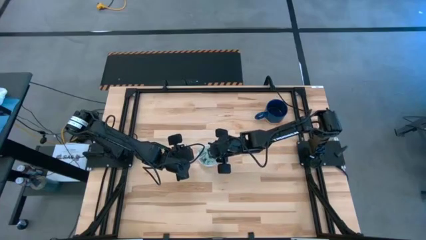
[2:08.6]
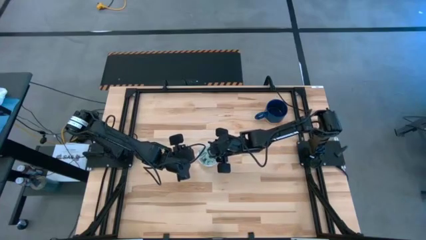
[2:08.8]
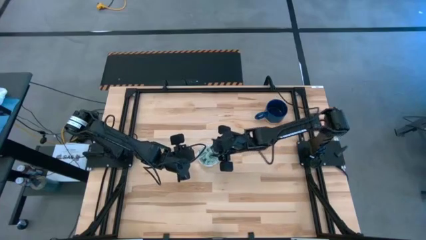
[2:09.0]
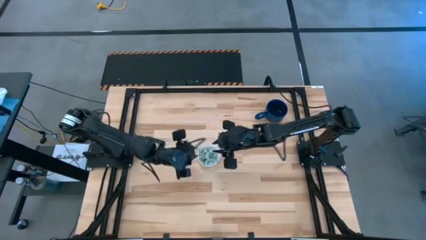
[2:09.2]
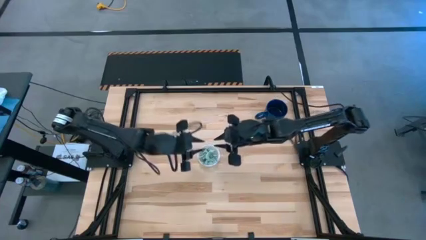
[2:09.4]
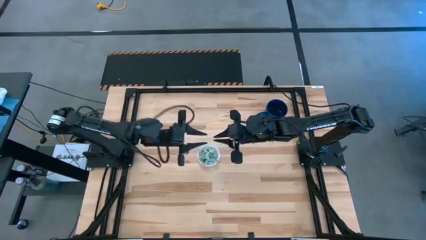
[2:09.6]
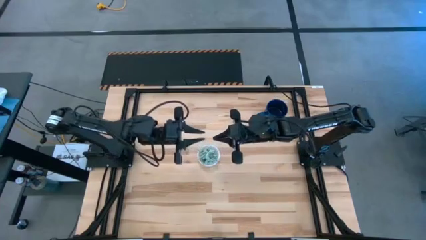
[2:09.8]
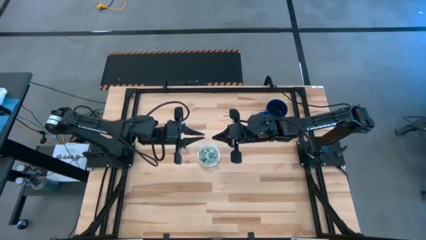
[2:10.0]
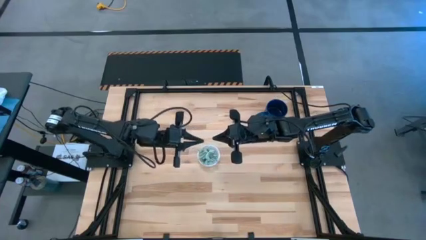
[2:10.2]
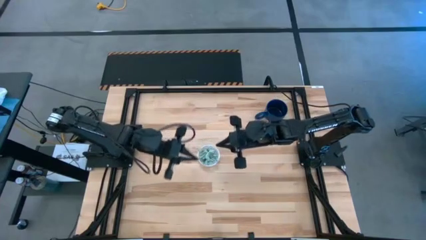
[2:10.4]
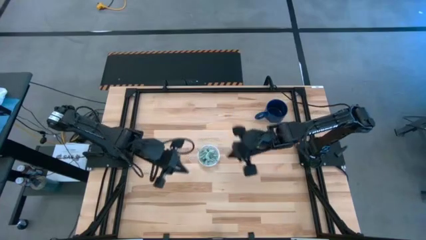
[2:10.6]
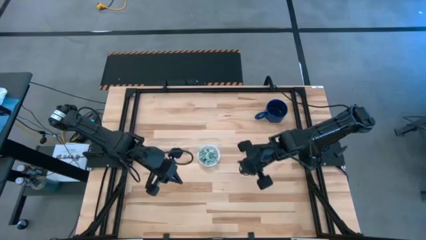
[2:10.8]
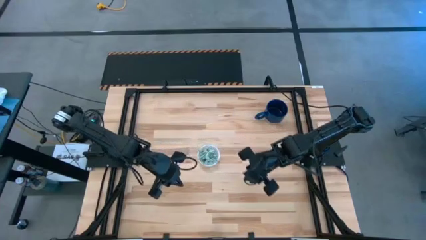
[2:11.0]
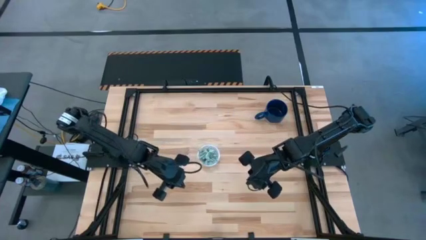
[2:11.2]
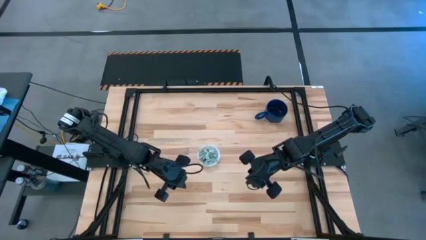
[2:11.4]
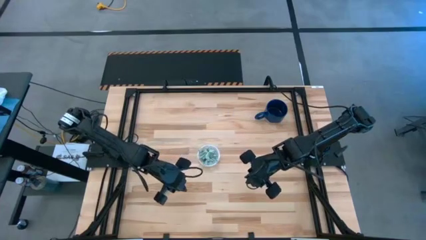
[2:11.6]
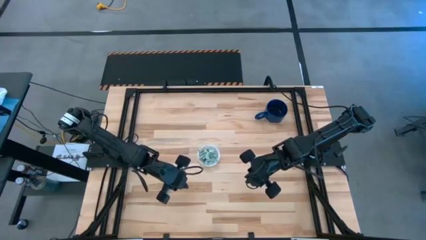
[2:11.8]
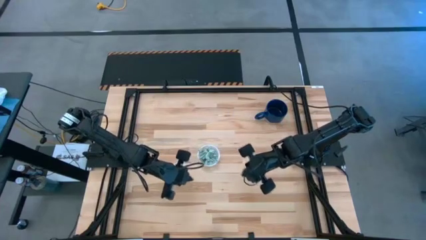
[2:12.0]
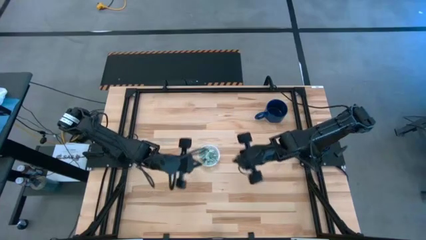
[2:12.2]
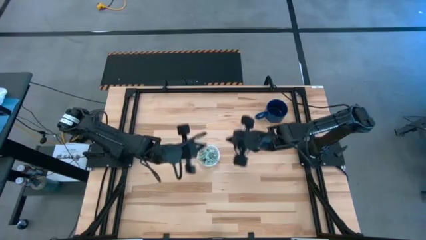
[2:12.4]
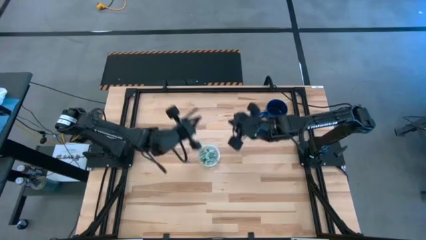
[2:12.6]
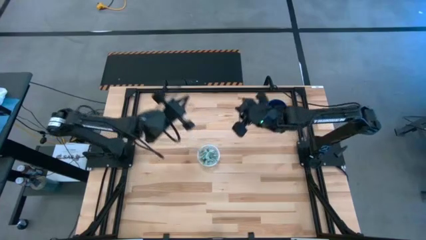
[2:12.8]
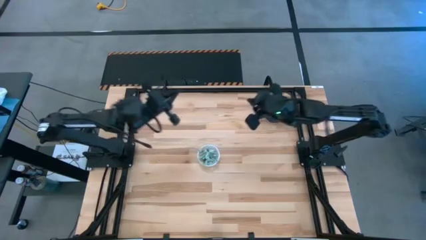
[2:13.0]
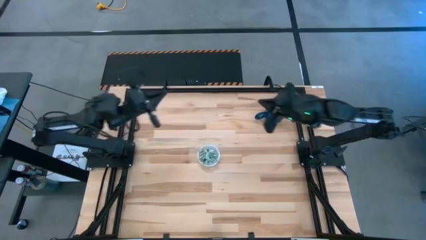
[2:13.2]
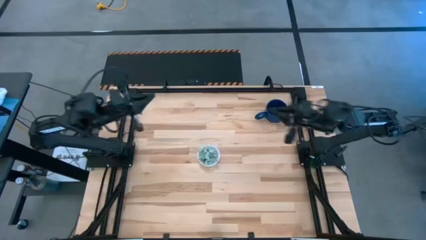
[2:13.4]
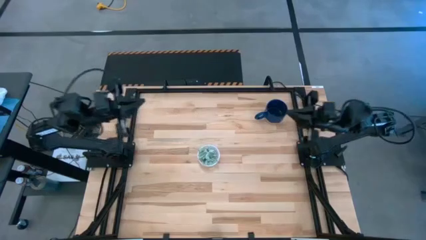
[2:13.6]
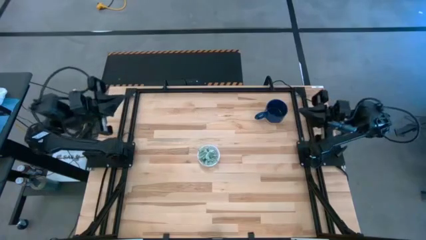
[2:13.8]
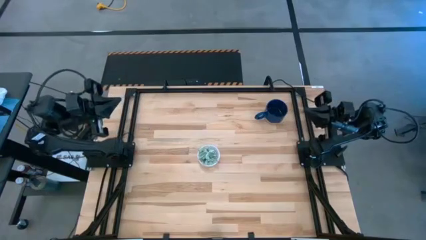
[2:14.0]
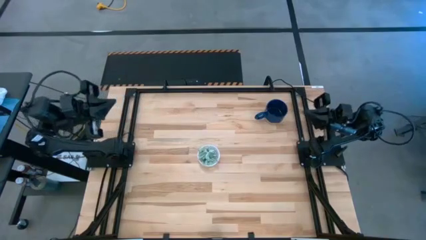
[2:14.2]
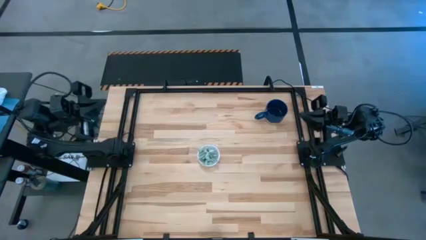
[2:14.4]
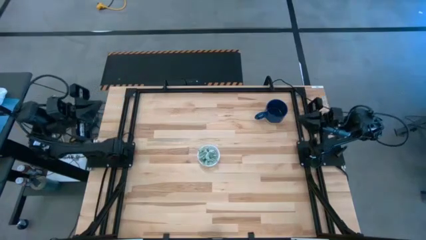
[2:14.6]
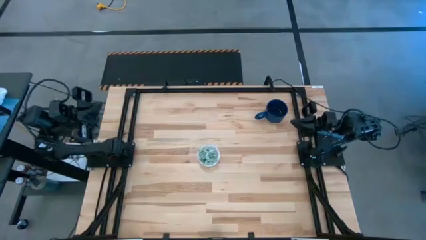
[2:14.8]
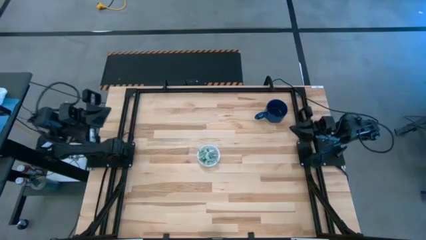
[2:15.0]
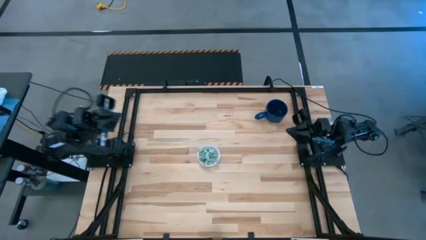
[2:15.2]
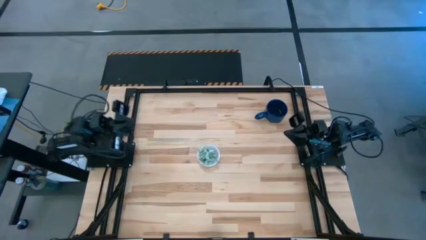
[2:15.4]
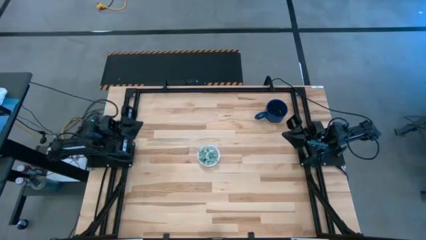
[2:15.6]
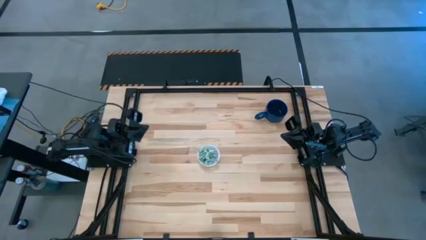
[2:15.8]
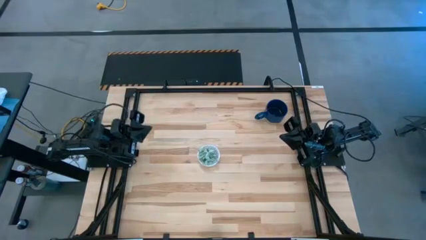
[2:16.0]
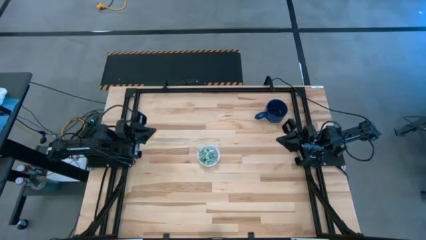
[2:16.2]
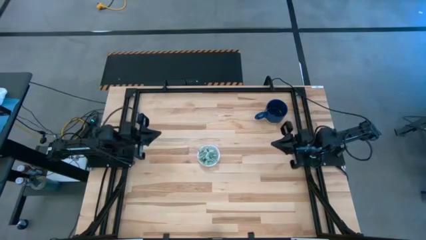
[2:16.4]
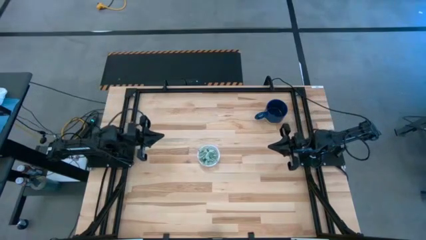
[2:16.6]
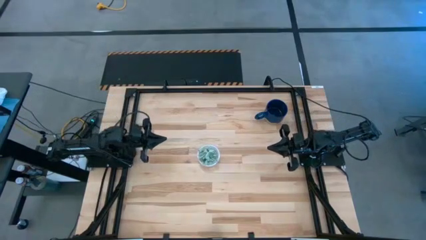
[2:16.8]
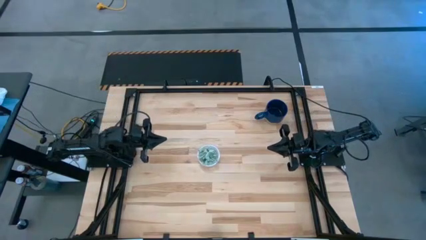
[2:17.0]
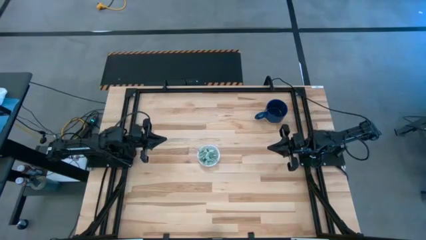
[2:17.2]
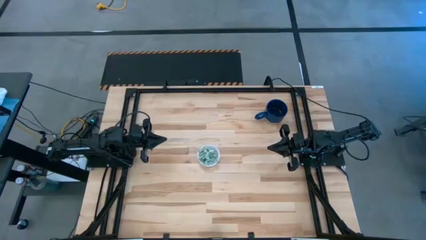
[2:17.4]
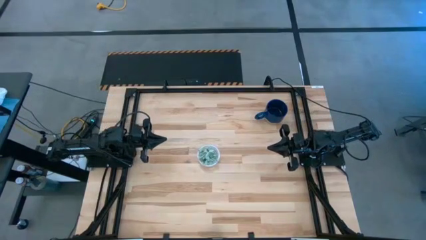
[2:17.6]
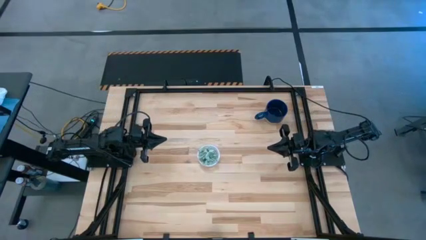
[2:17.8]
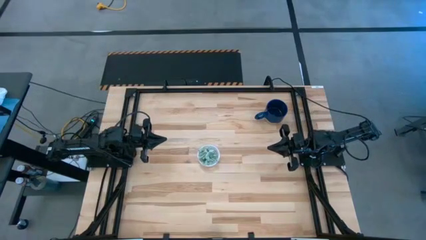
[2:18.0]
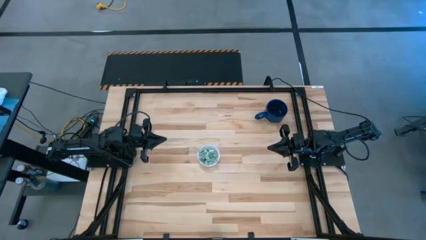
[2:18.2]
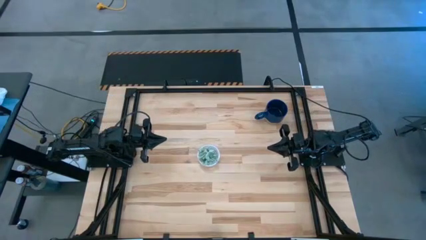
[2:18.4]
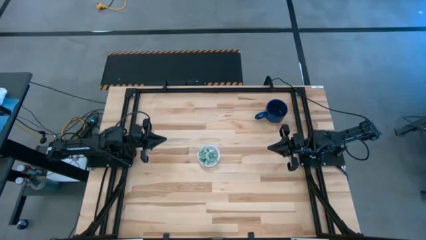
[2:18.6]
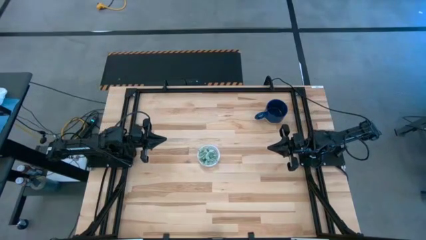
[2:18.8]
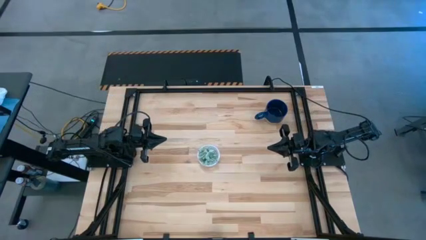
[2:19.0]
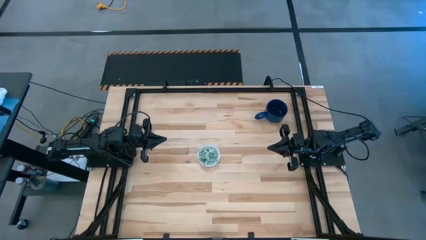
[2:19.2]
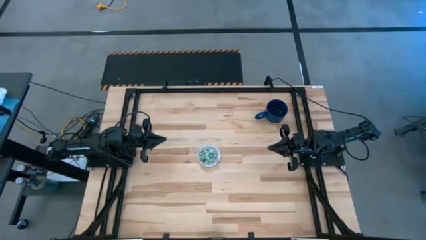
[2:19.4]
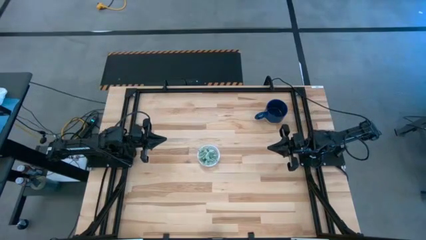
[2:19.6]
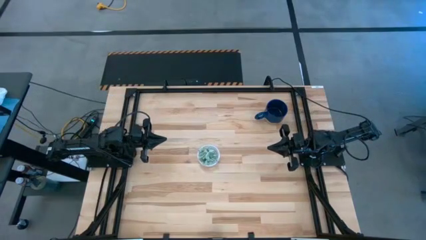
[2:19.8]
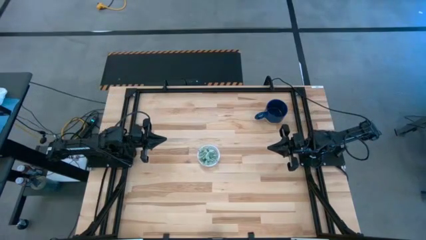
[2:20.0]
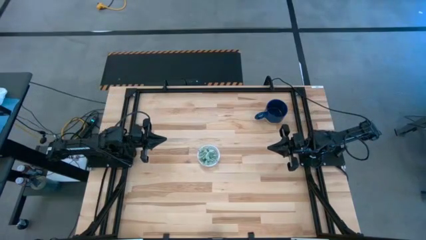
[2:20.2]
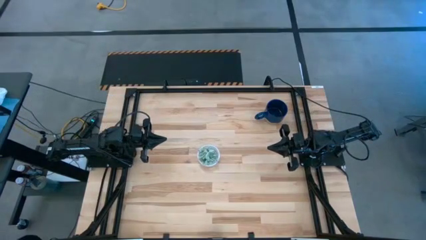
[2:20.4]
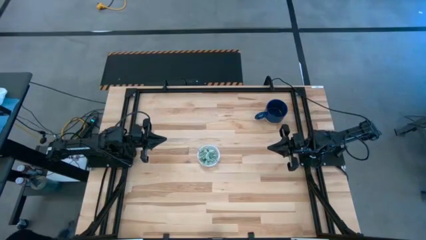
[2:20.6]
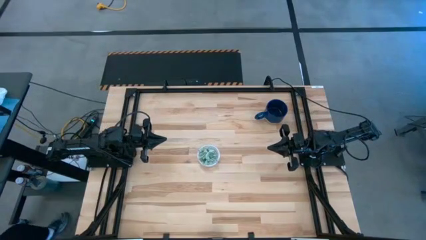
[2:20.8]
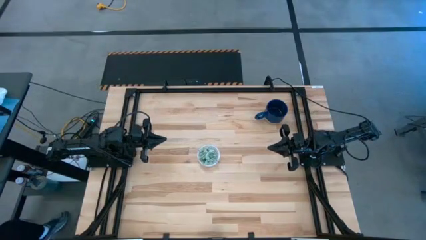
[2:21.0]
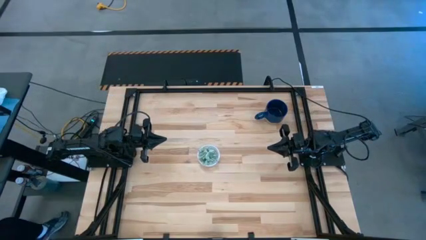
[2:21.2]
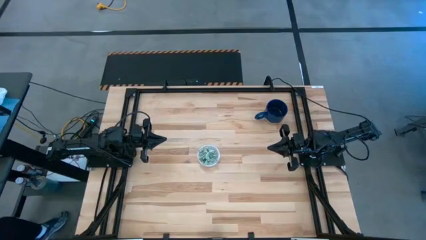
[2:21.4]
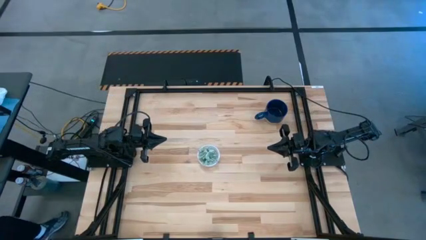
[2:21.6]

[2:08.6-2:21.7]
Task: Pick and place items into bin
Return to Home Position

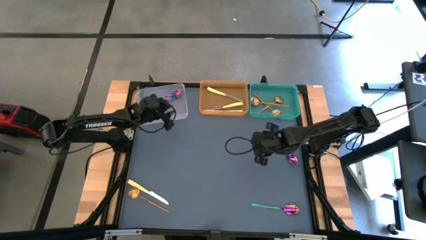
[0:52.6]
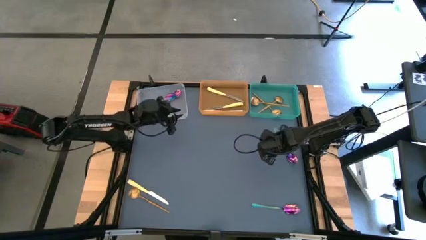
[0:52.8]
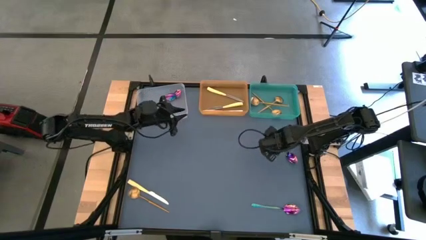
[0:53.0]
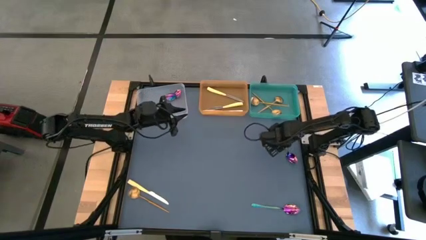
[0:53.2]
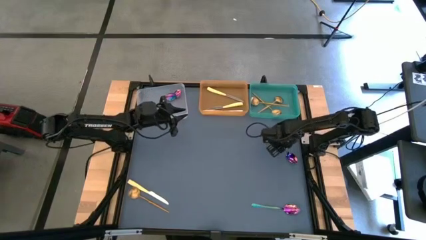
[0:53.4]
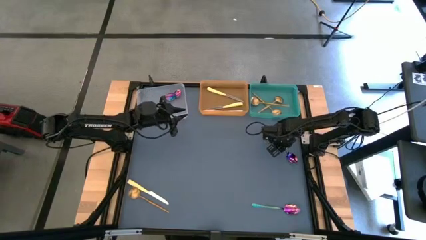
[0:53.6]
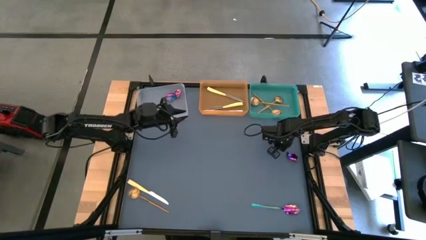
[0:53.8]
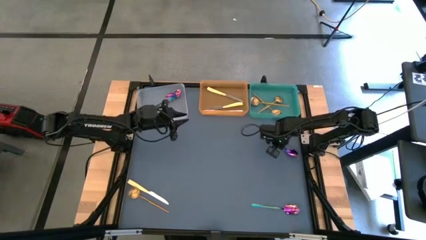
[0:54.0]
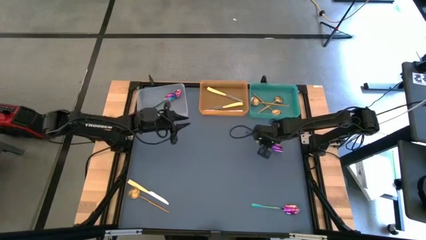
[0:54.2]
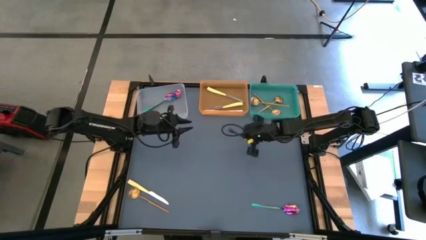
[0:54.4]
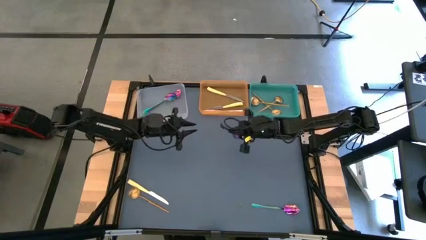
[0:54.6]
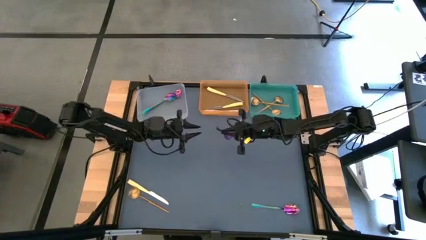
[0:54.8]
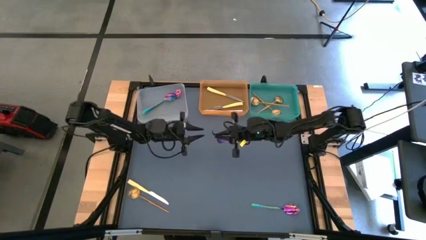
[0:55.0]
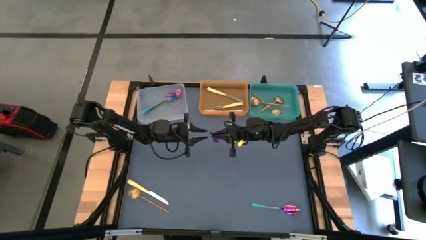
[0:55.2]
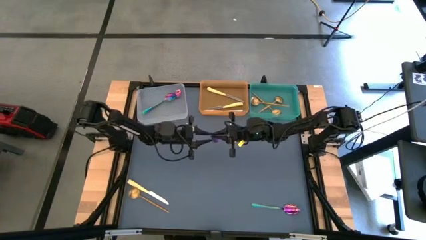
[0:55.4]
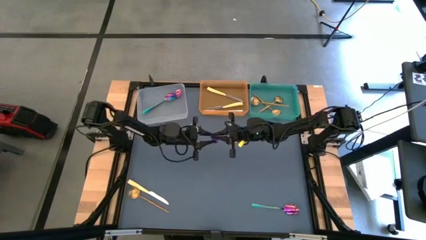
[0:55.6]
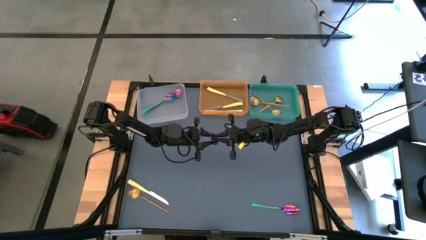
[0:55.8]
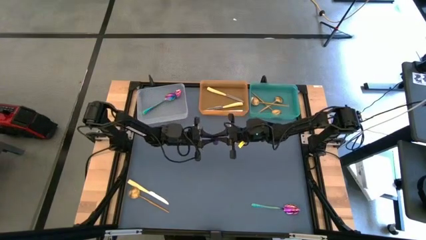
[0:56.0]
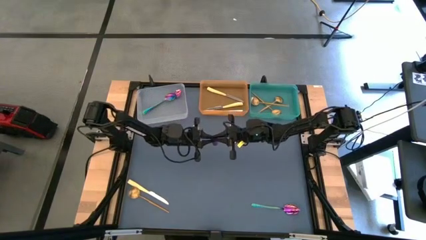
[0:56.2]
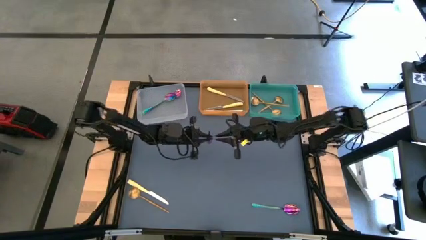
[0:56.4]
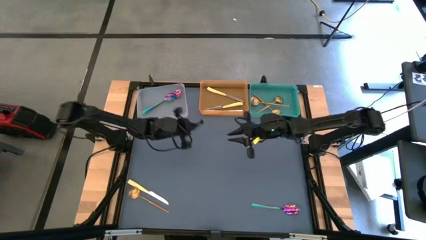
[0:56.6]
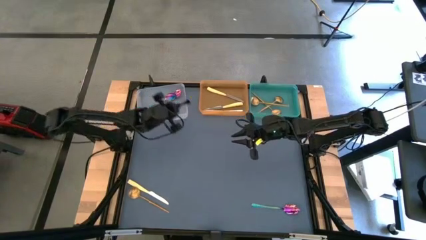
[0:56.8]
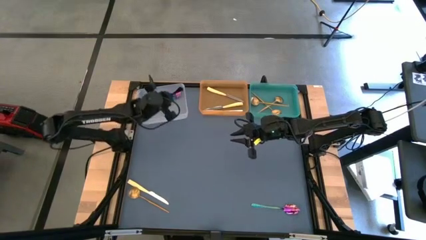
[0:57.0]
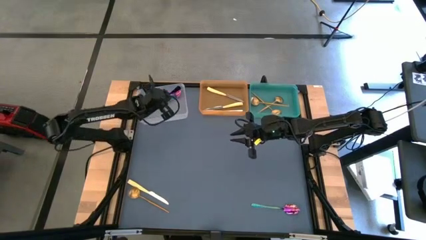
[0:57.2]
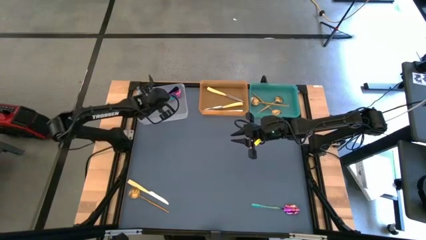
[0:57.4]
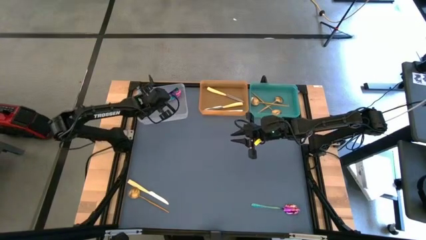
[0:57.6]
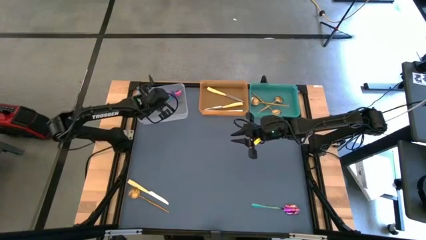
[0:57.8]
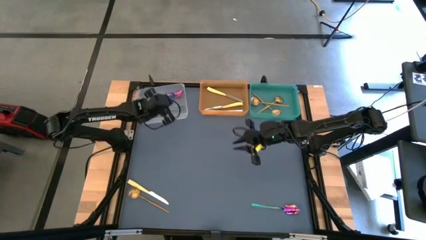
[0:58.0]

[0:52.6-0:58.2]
Task: Sort silverware by color (type)
Put the iridescent blue spoon into the transparent bin
